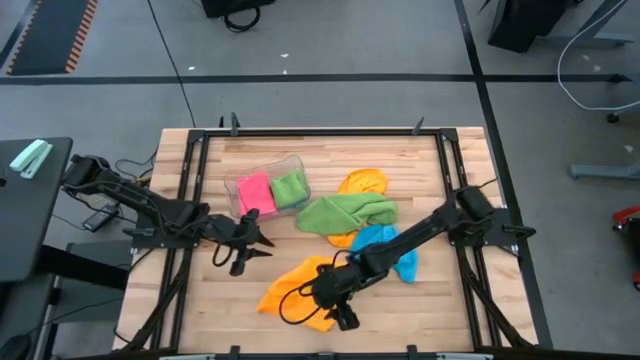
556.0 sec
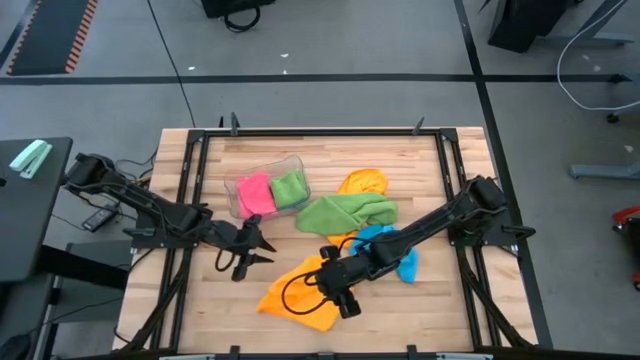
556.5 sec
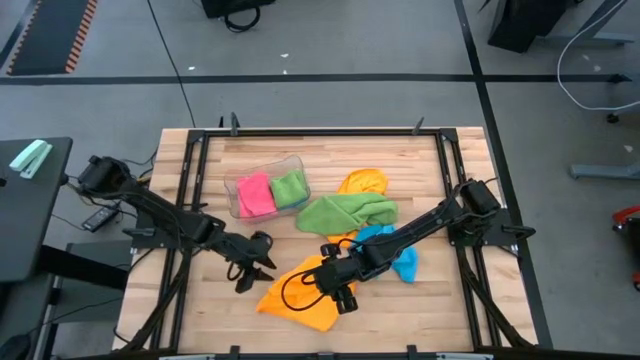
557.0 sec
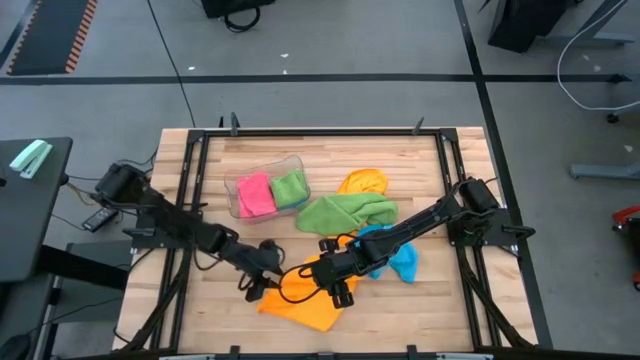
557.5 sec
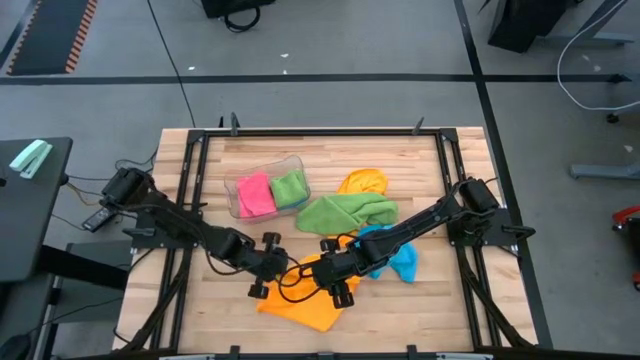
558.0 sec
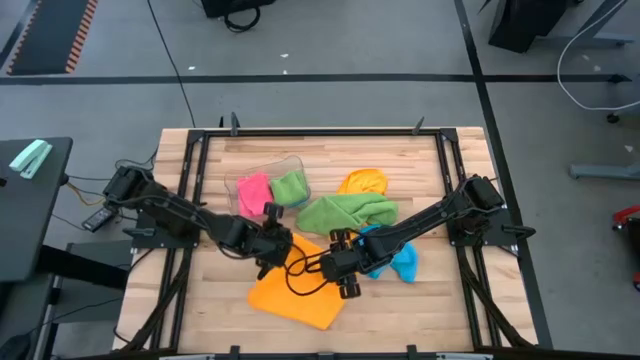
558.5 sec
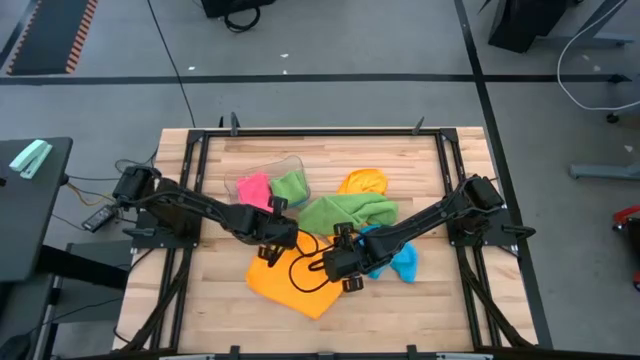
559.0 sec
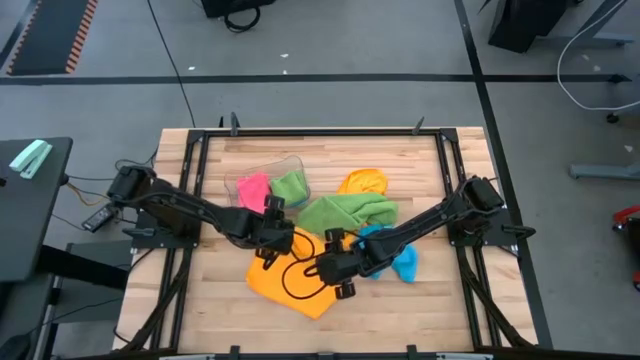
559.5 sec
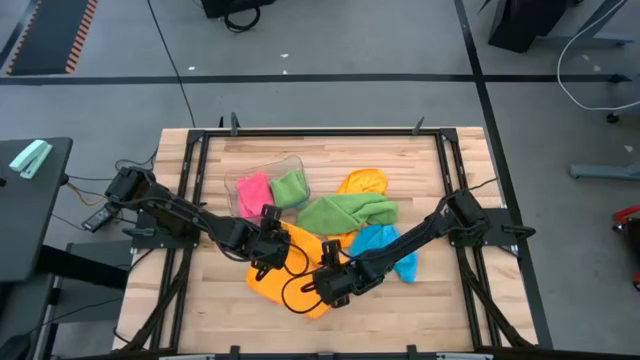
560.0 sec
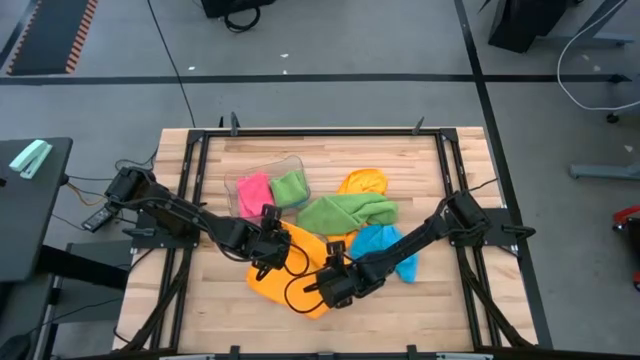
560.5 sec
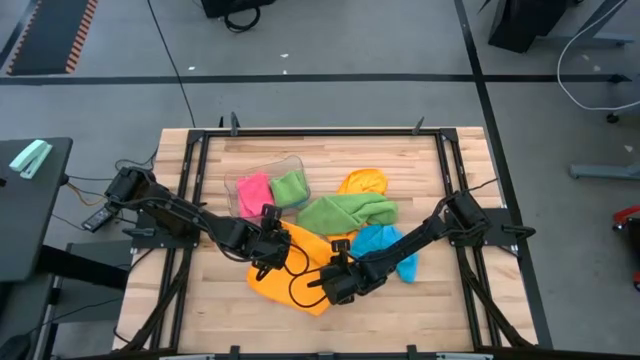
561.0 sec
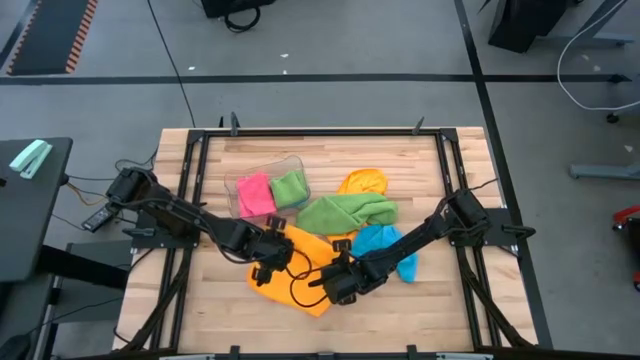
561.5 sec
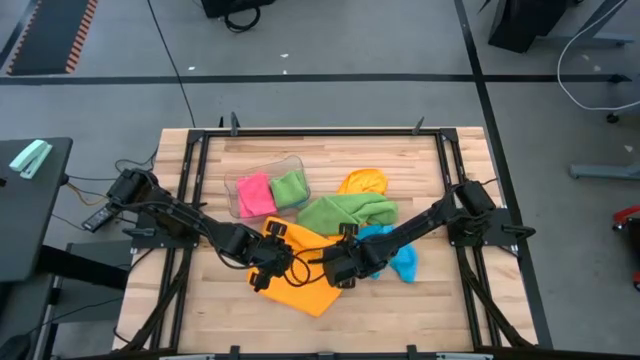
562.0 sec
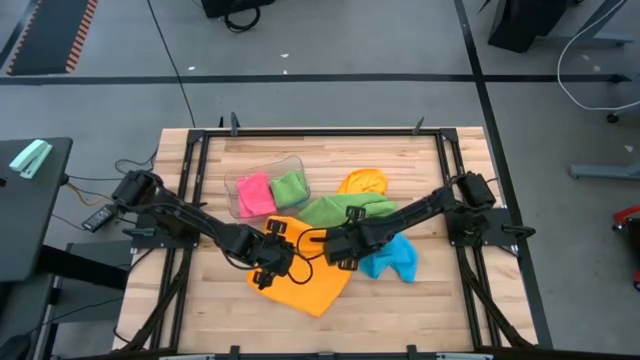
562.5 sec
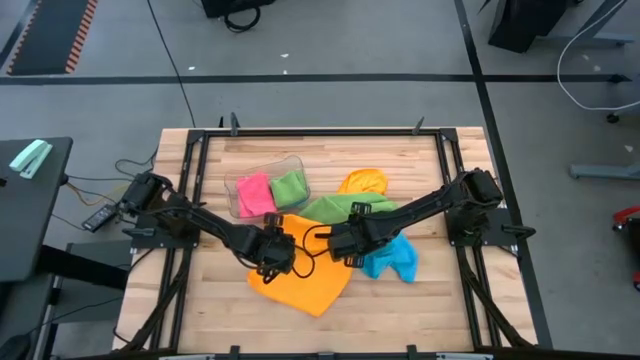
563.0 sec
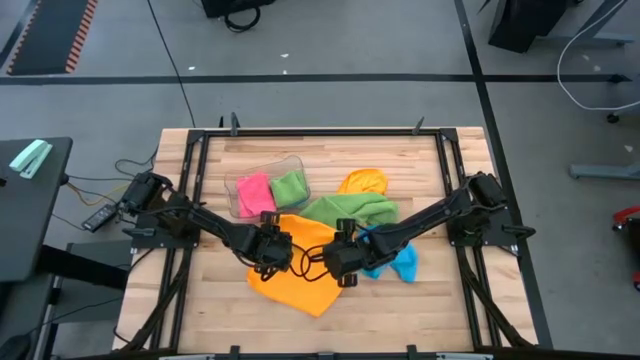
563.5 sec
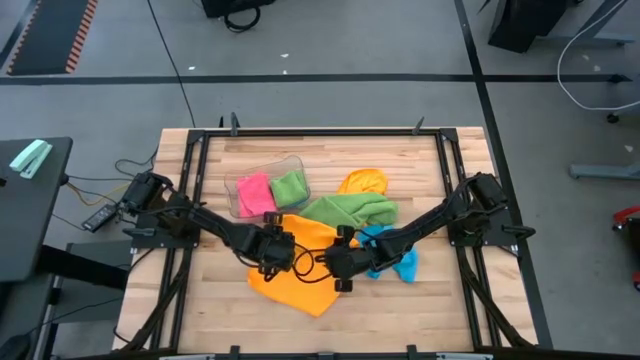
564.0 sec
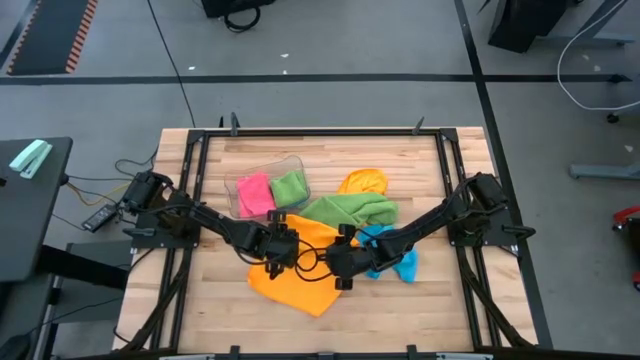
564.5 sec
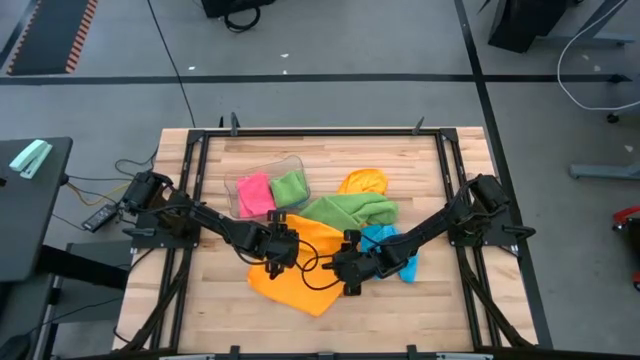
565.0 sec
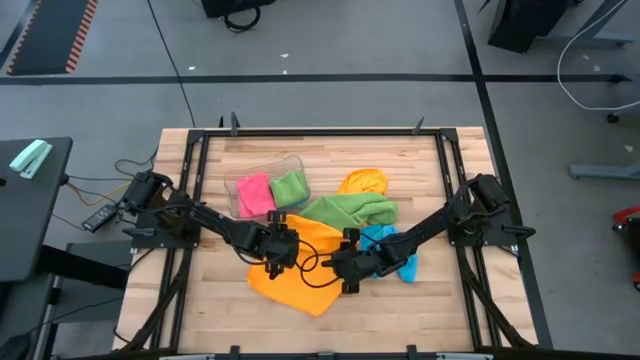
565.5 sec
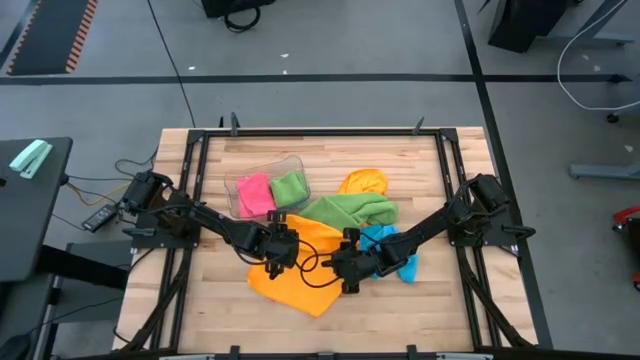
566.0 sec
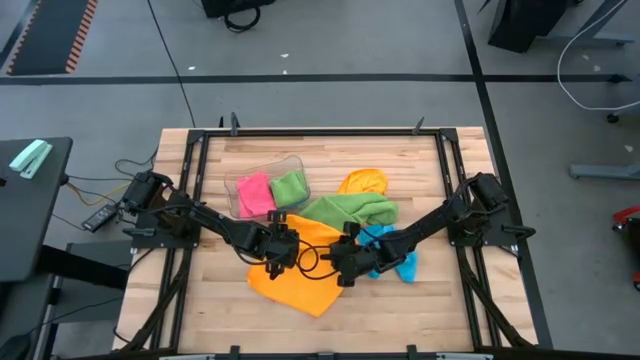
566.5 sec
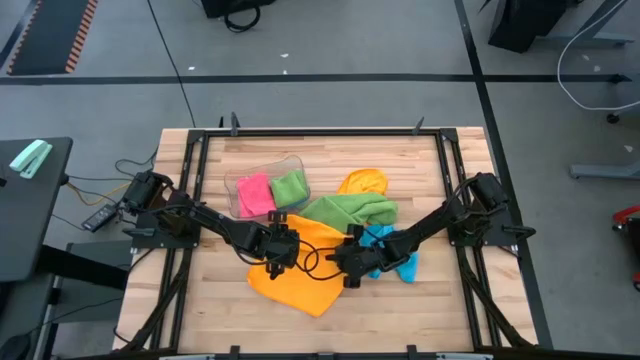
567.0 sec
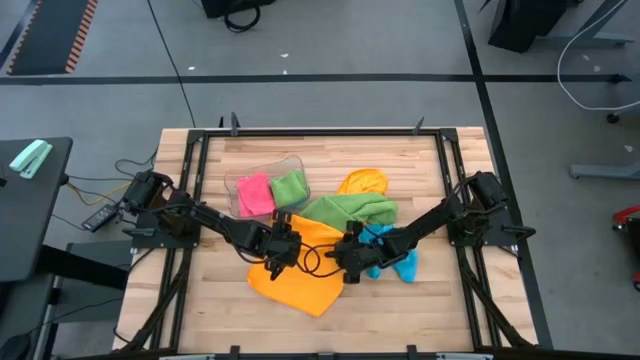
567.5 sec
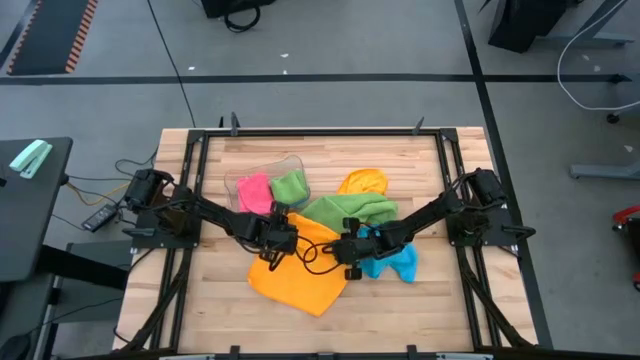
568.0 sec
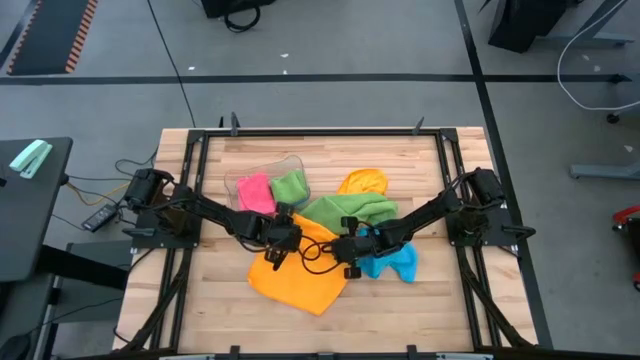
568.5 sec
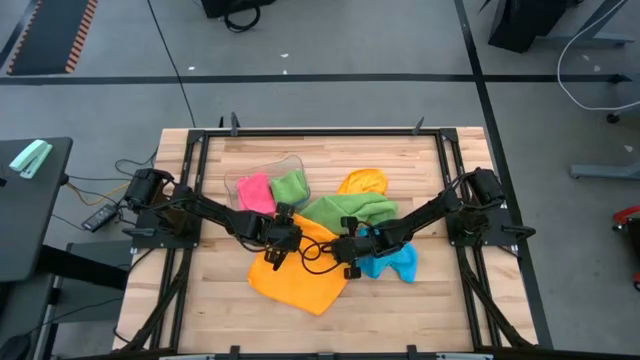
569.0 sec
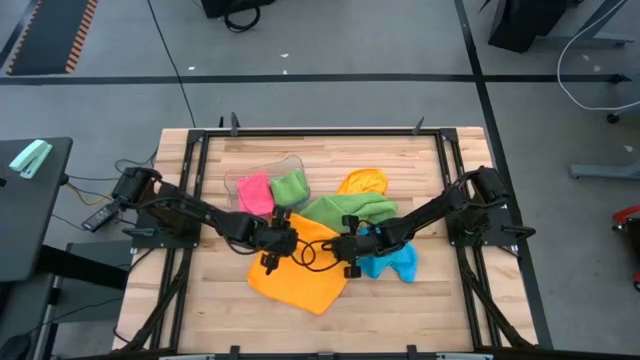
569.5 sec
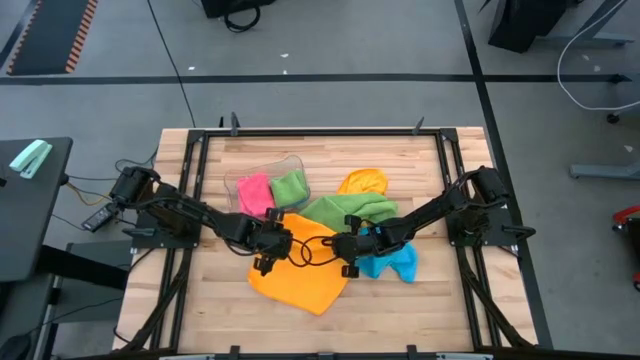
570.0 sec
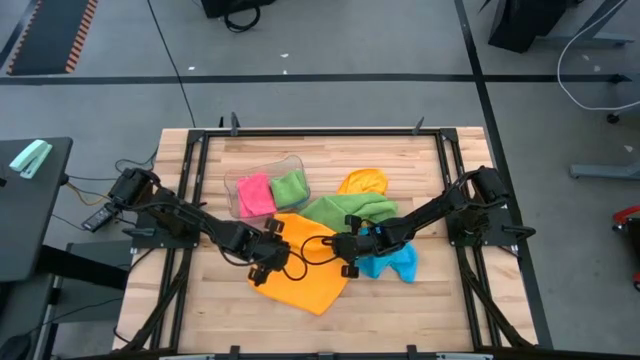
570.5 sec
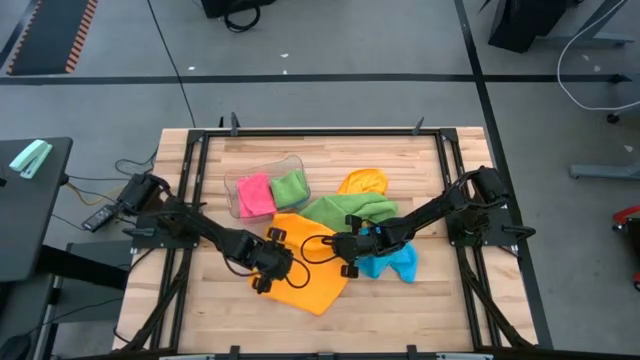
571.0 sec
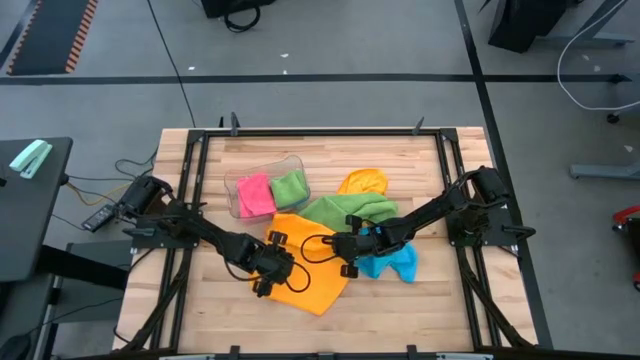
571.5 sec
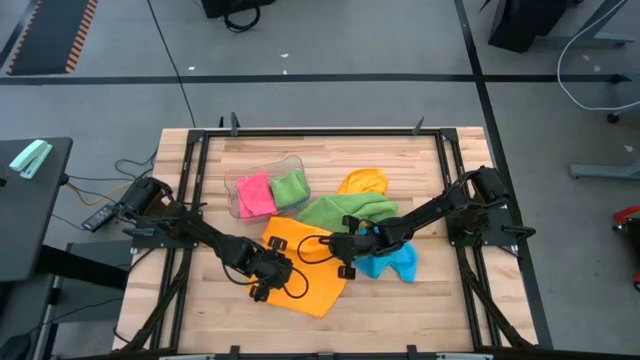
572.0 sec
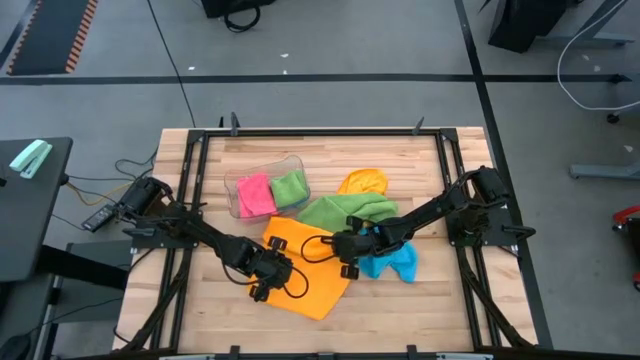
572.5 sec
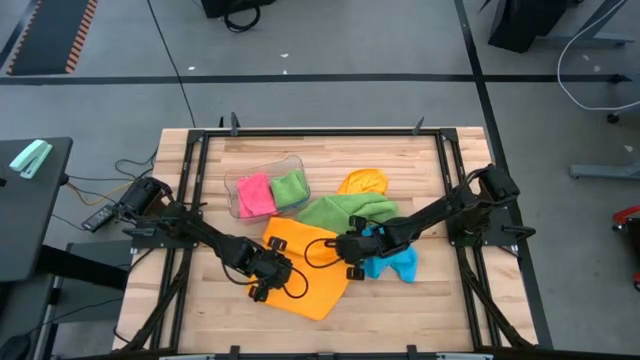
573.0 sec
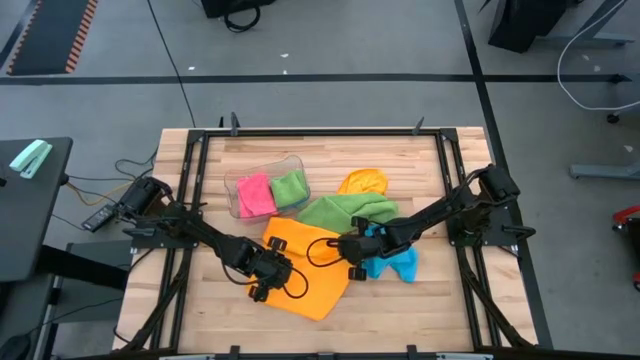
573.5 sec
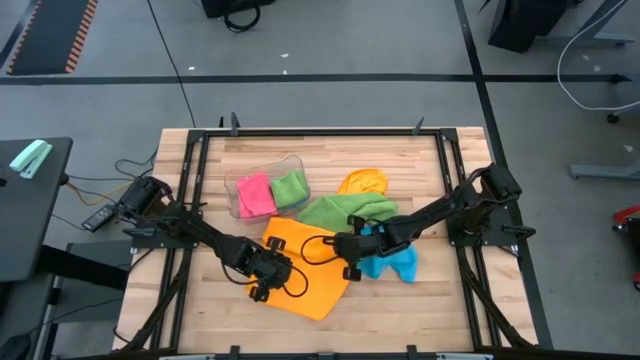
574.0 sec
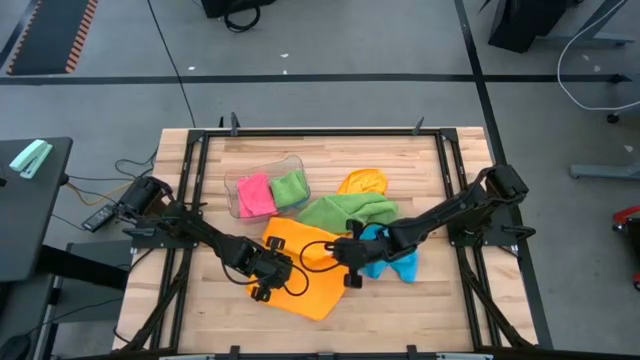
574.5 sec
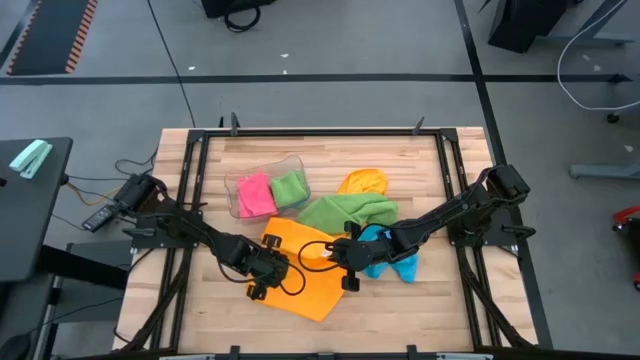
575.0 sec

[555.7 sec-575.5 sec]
Task: Fold microfiber towels
Fold the bottom yellow microfiber towel

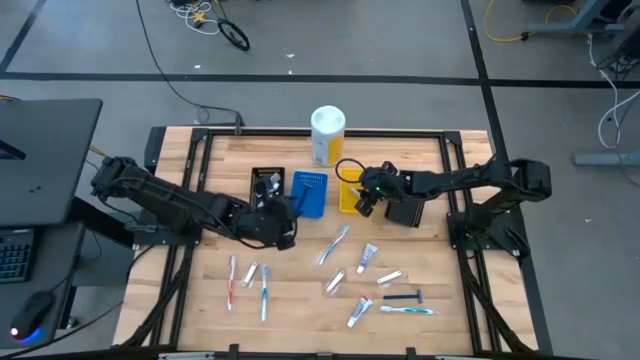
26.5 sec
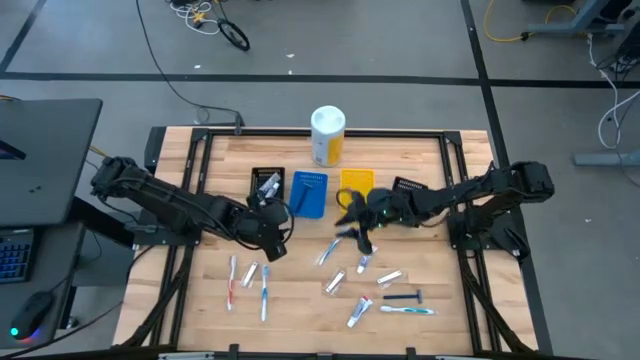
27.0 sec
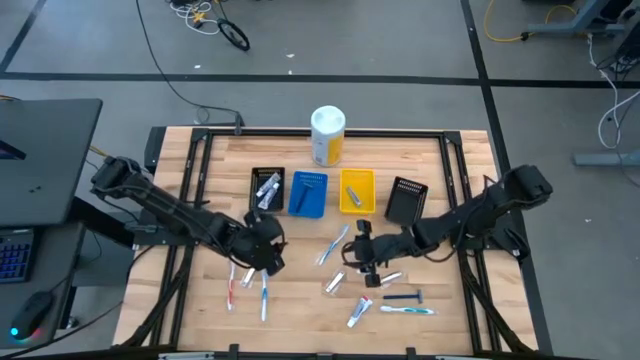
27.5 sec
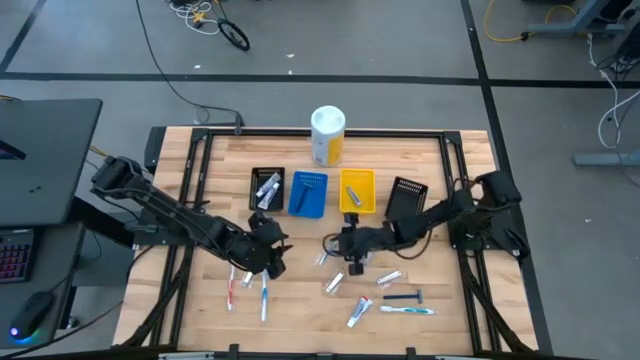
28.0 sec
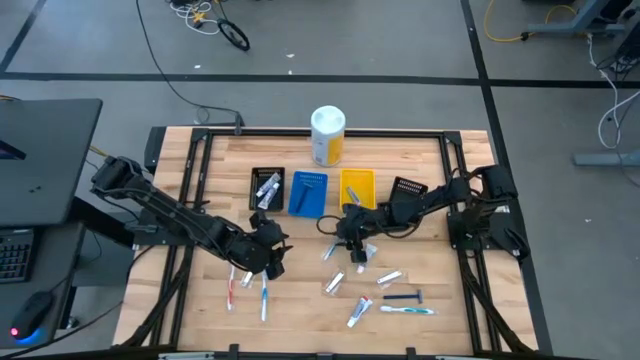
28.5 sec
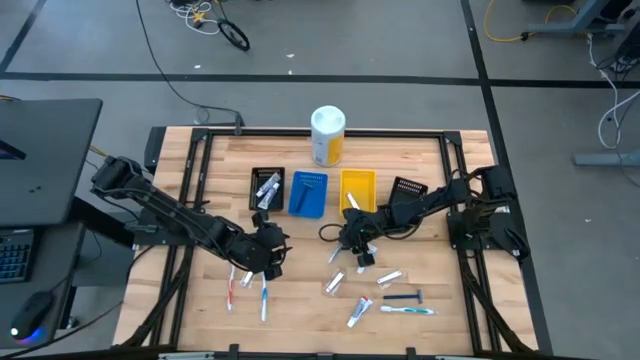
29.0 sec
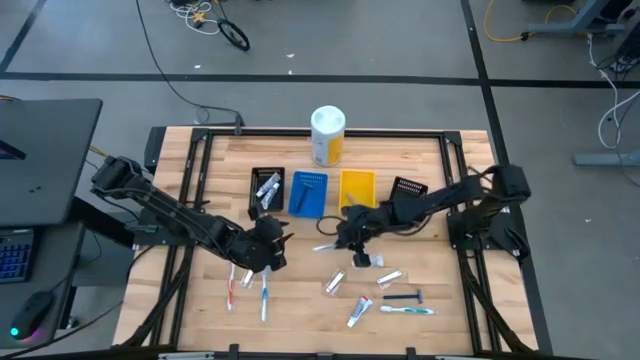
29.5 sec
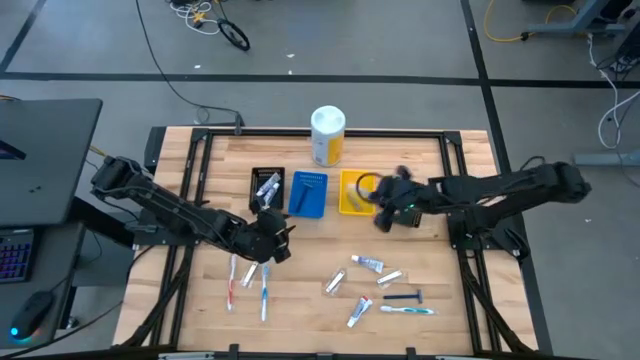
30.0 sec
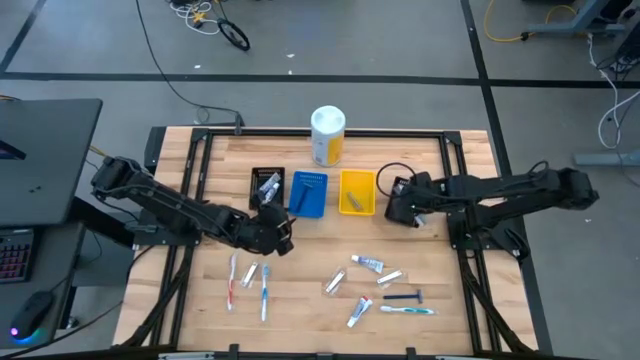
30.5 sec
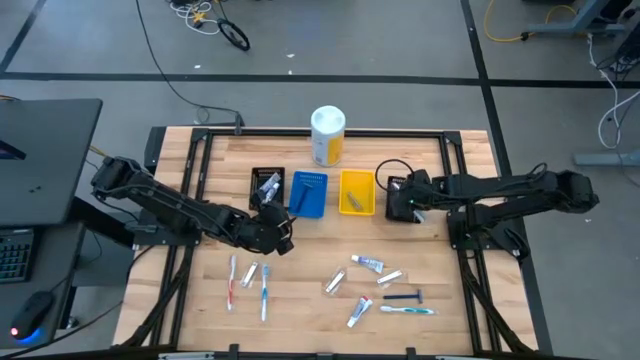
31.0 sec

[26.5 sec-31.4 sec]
Task: Pick & Place Travel size toiletries
Put the blue toothbrush into the right black bin
